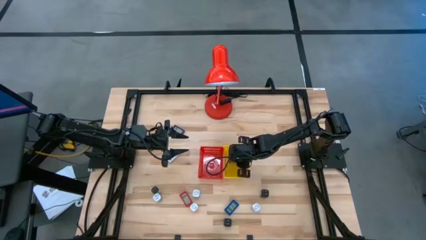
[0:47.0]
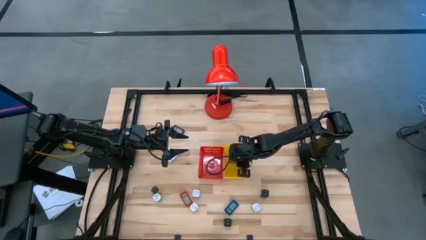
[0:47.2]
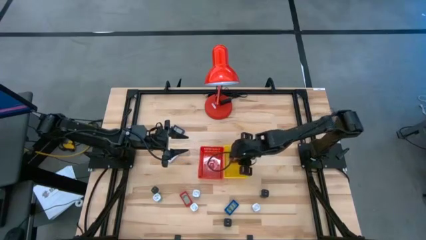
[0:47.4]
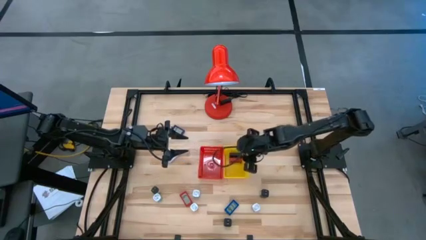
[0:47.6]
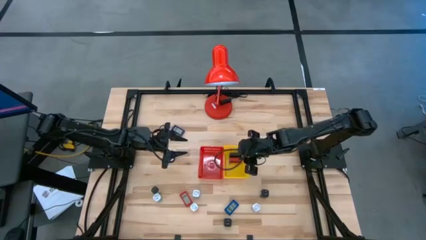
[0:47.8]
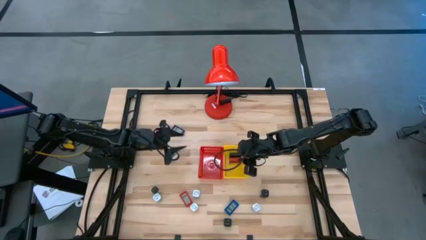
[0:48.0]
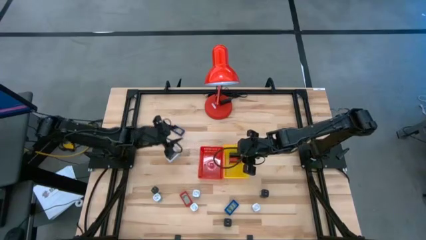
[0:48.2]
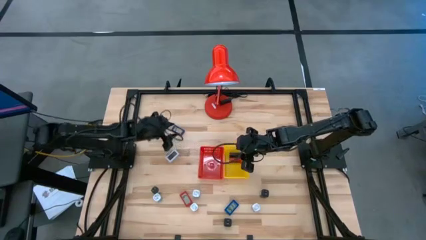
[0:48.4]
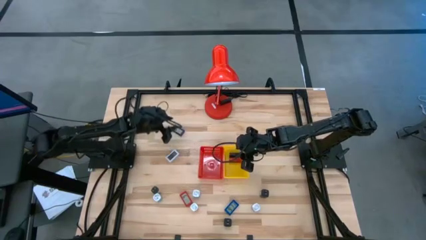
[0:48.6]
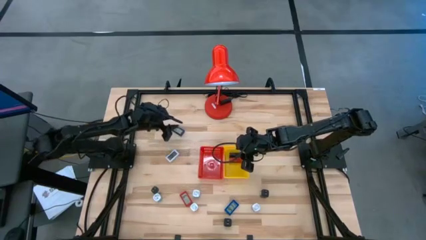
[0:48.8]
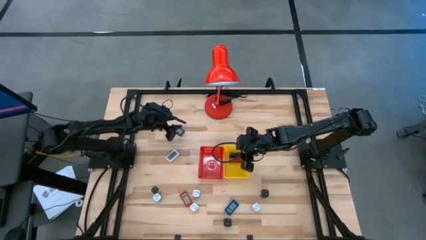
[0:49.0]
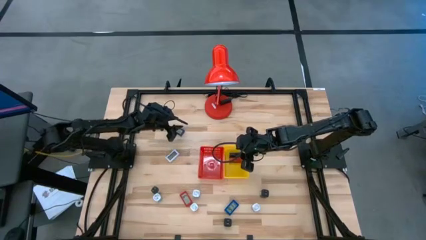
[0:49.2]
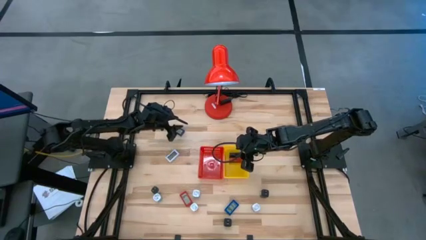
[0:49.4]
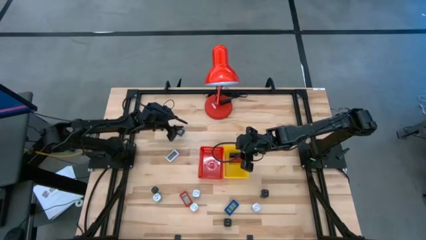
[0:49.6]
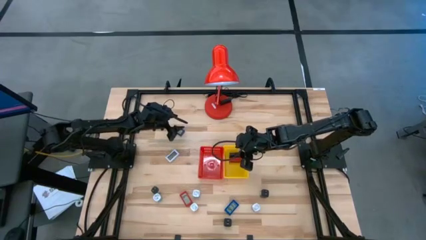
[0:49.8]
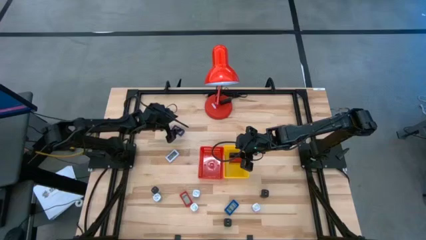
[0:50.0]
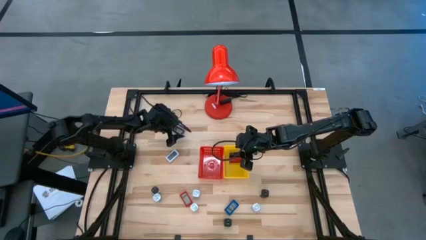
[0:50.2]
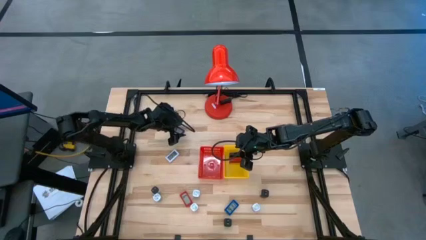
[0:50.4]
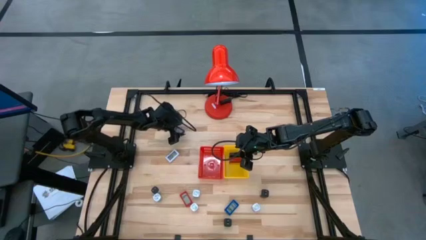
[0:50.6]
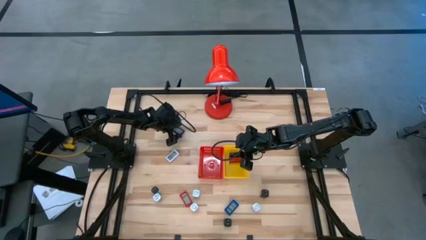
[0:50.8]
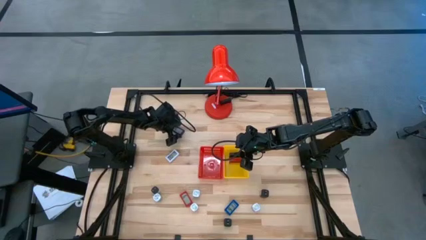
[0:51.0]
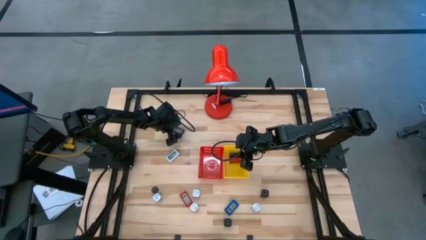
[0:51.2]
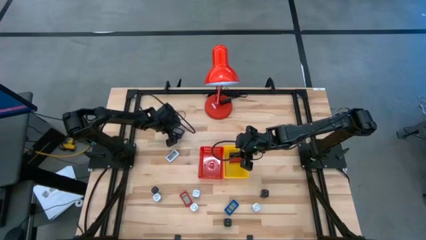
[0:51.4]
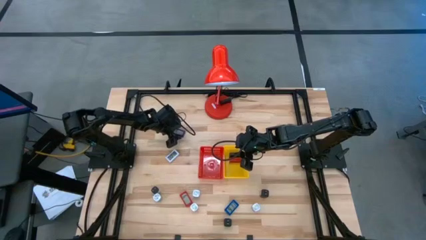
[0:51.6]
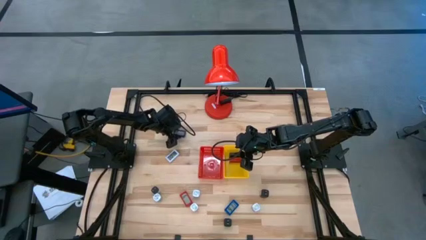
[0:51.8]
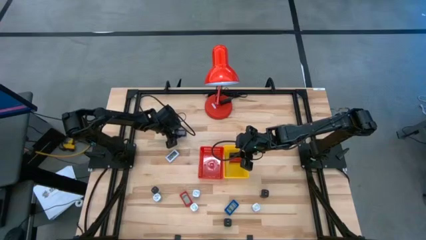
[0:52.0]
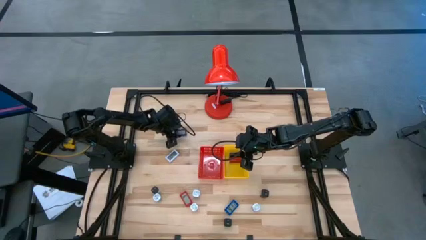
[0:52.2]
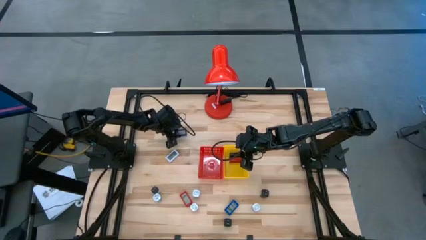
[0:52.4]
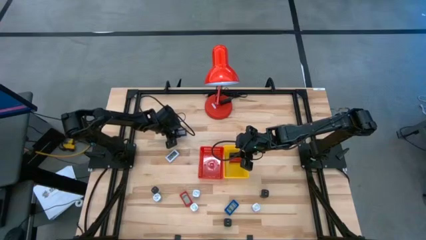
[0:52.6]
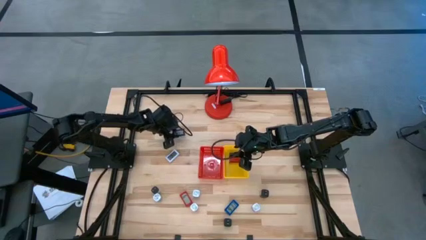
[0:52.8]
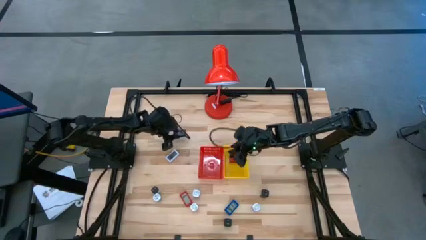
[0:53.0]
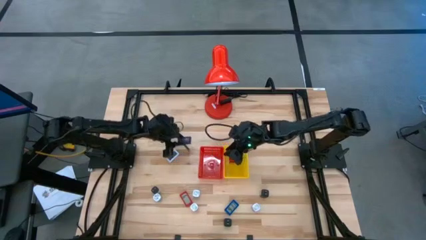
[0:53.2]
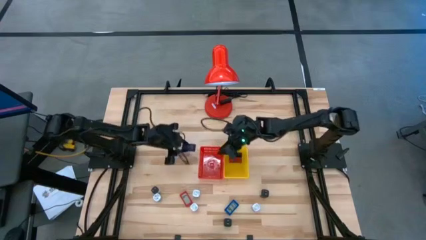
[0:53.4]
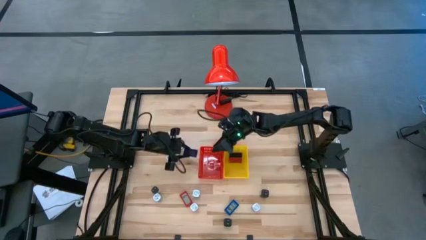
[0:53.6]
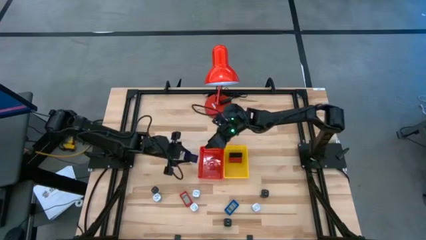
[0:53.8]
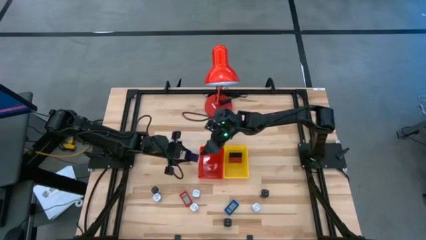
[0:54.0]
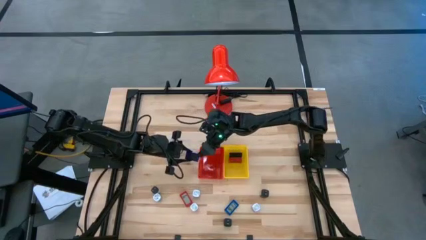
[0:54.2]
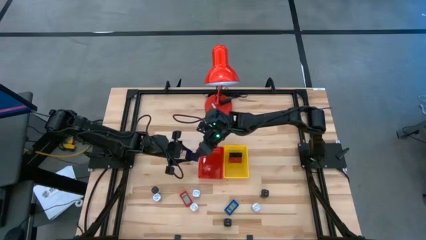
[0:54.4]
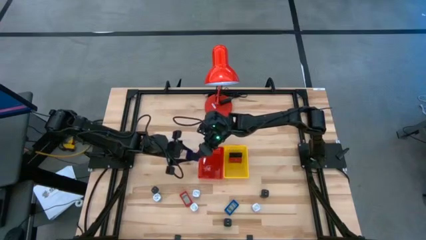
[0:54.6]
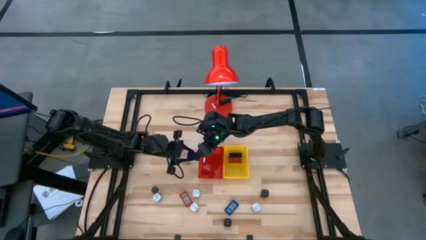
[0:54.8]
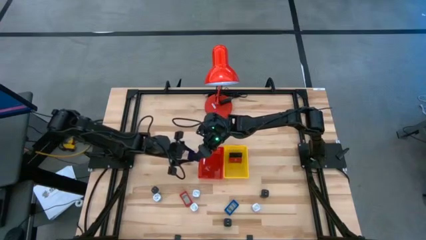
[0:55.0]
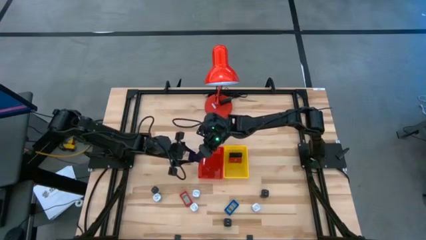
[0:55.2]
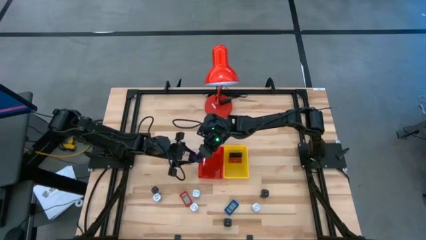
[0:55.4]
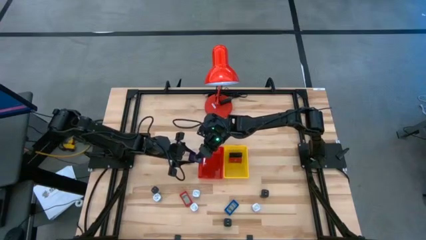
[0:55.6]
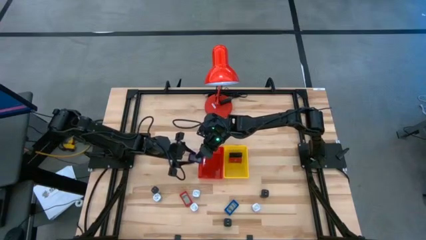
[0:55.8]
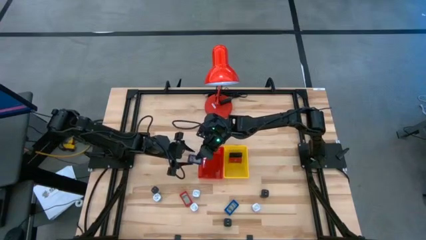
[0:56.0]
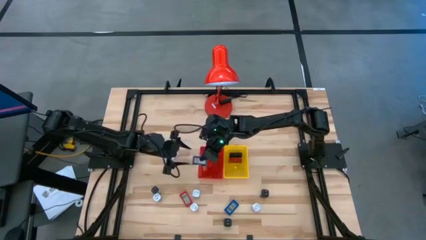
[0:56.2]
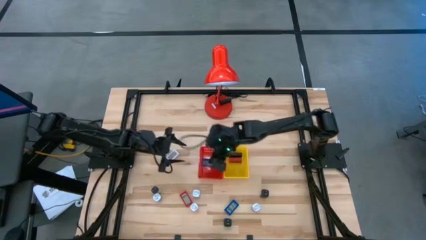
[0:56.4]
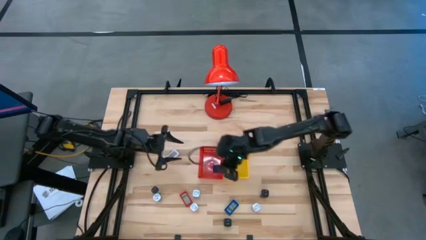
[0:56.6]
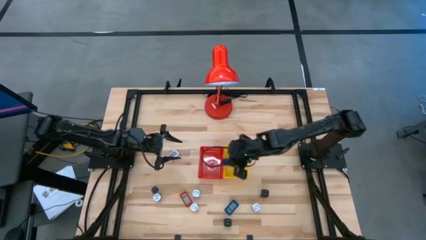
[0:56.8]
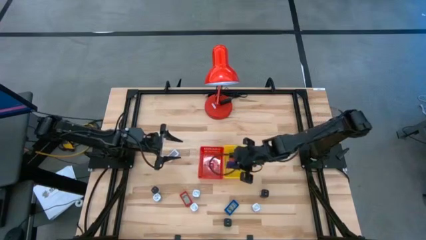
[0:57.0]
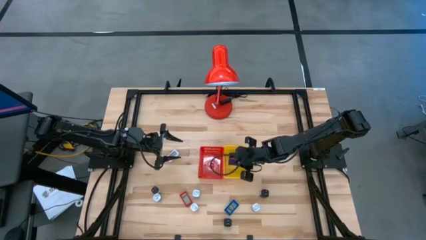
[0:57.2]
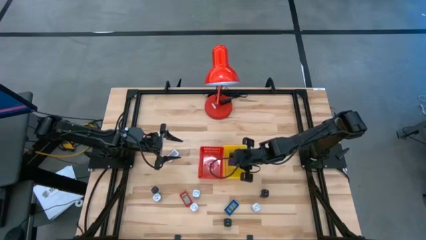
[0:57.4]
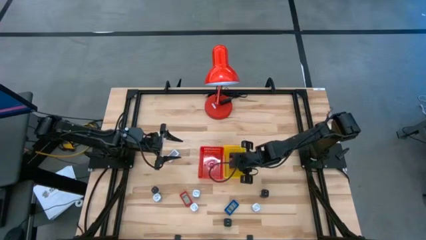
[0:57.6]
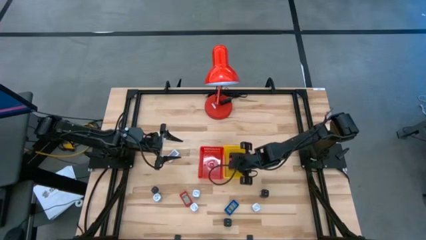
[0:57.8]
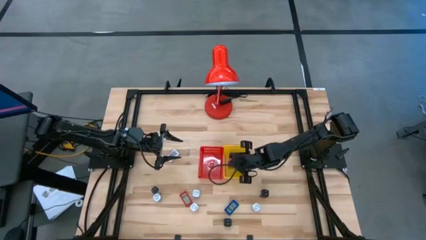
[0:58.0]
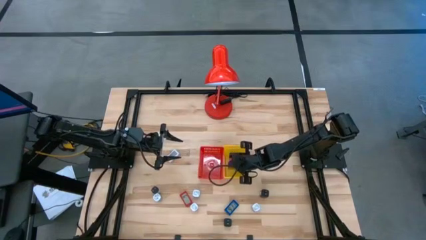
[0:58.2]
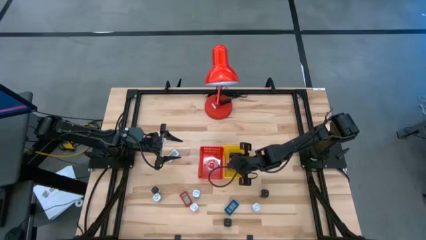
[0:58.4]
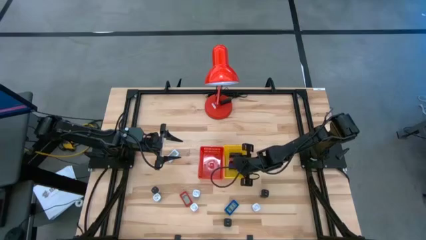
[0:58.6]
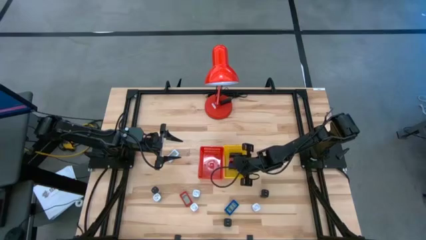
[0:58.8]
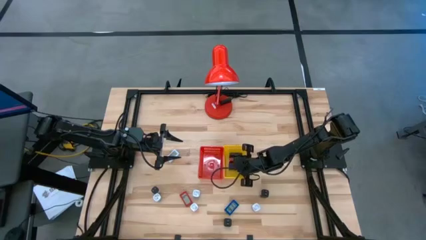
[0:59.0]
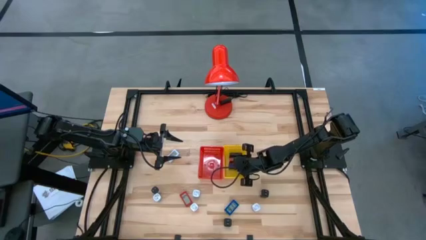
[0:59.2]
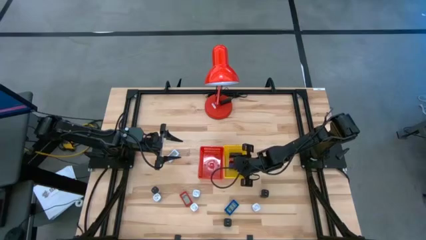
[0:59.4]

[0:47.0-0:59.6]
Task: Pick & Place Office items
Put the top blue digital timer into the yellow bin

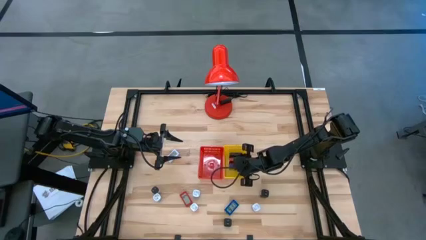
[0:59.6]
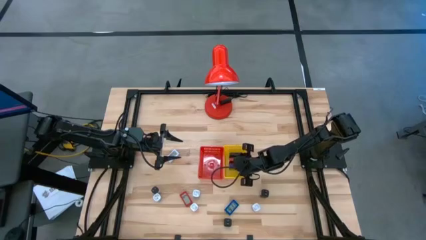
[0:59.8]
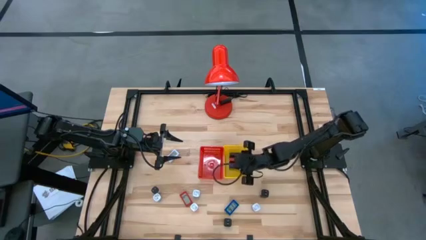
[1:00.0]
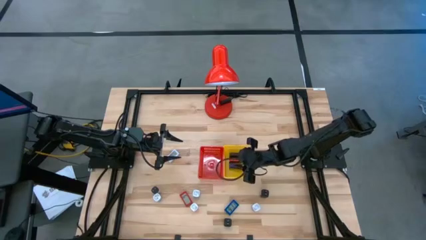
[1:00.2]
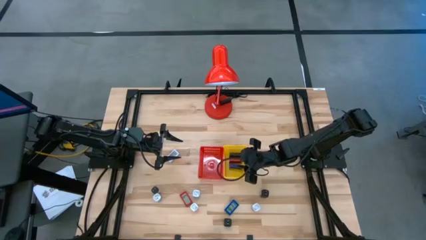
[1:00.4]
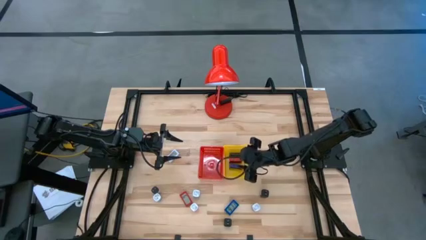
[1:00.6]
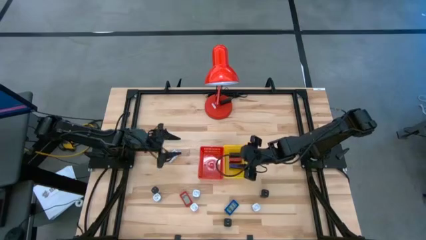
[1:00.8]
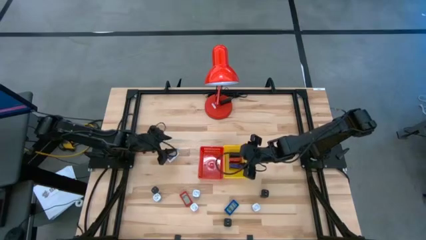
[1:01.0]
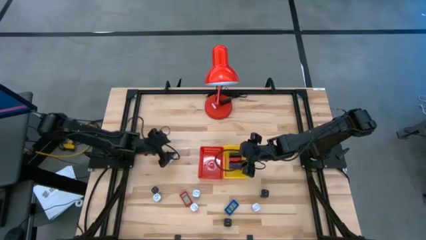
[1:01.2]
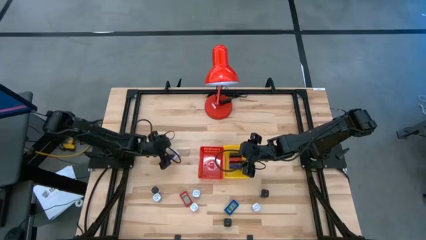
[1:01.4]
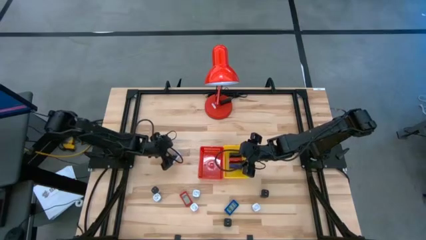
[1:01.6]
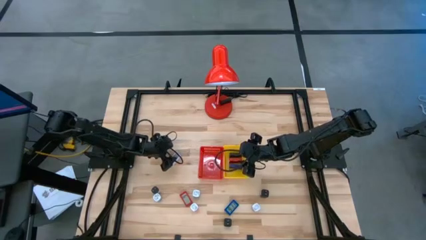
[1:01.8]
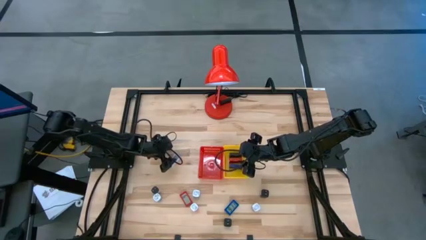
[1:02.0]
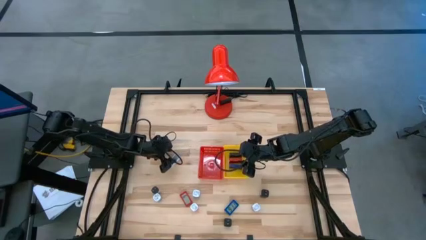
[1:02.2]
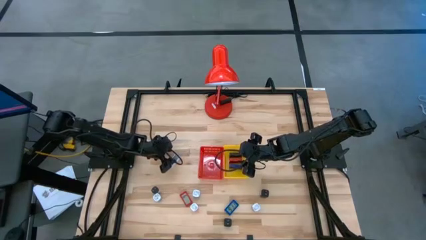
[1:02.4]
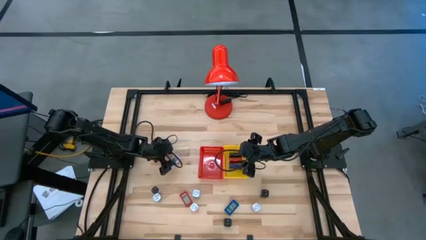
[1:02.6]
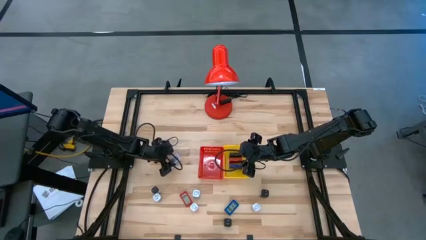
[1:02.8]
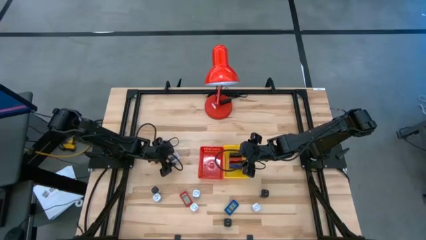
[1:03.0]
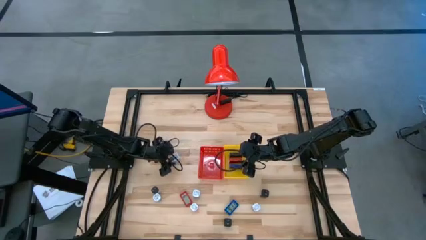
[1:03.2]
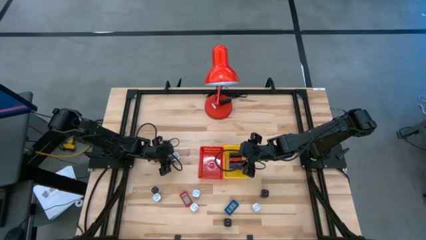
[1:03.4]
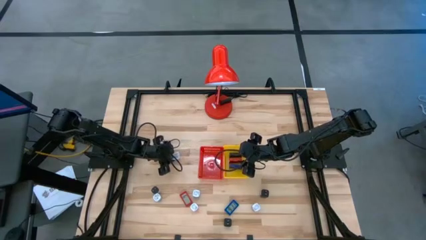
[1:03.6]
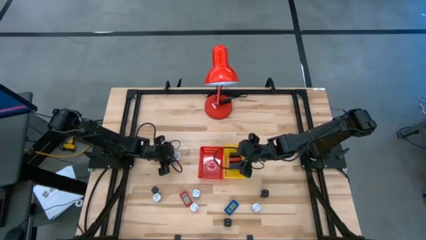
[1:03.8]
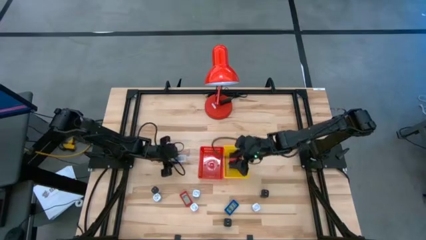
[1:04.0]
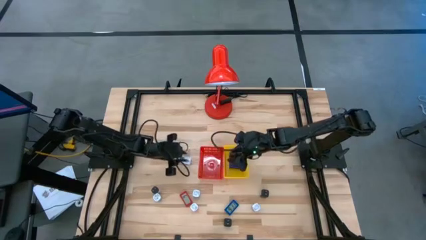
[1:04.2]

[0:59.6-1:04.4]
Put the white digital timer into the yellow bin
